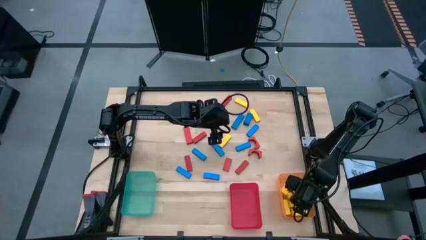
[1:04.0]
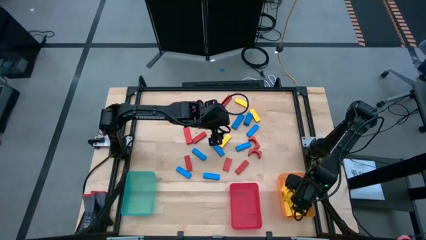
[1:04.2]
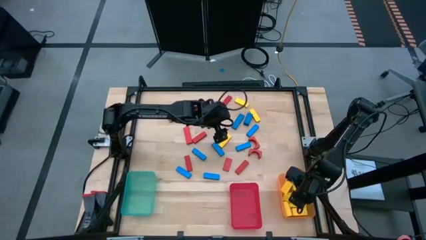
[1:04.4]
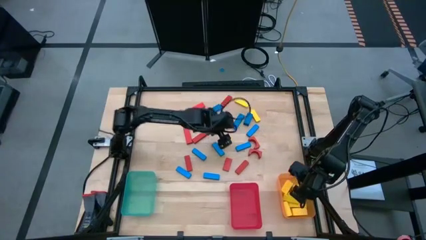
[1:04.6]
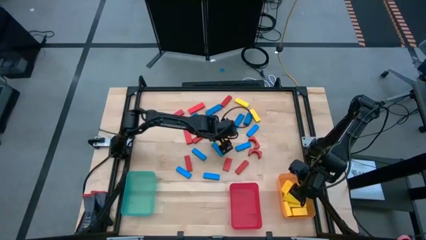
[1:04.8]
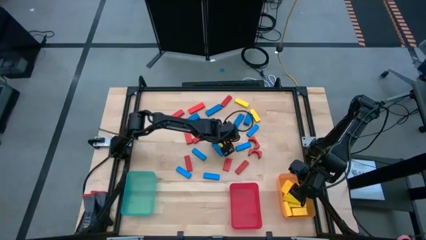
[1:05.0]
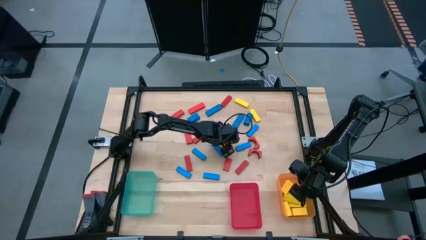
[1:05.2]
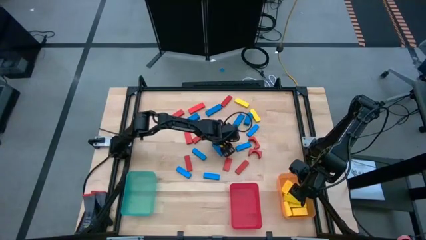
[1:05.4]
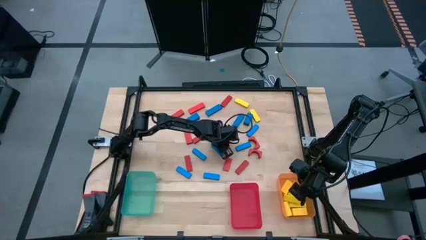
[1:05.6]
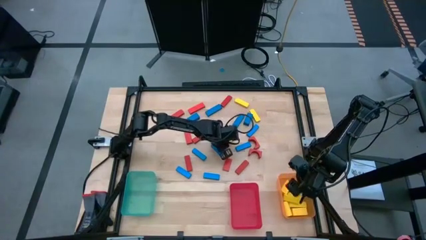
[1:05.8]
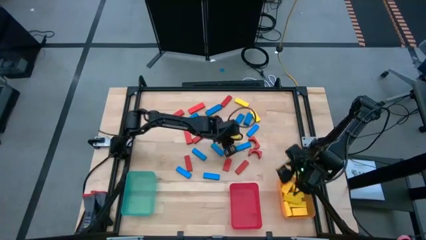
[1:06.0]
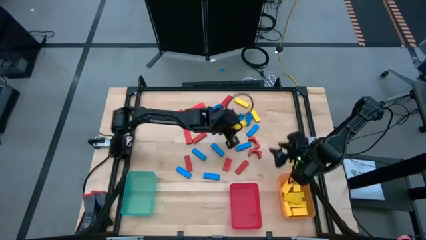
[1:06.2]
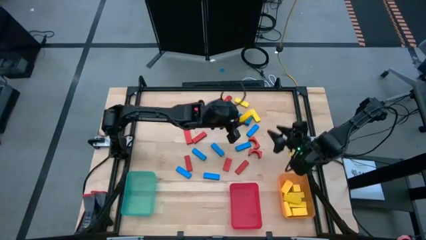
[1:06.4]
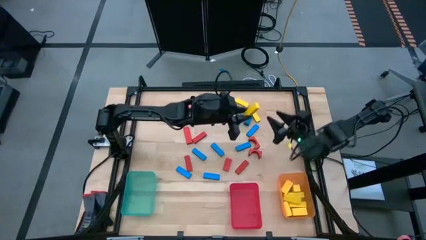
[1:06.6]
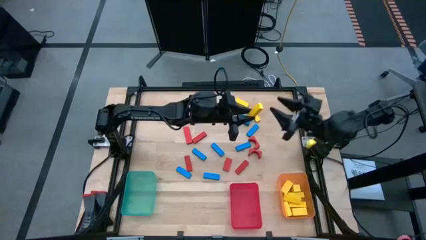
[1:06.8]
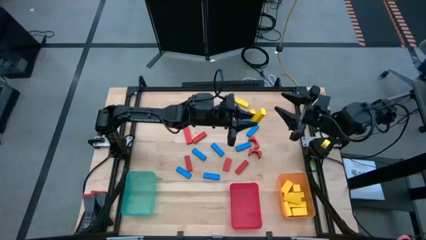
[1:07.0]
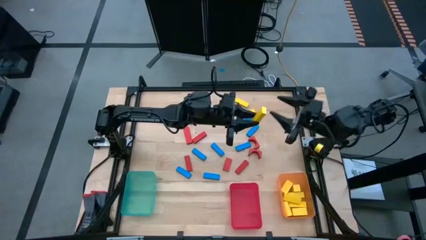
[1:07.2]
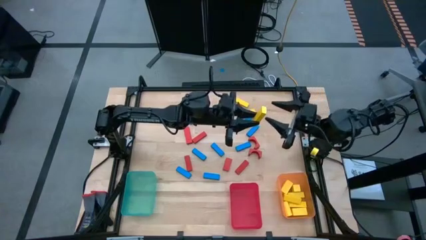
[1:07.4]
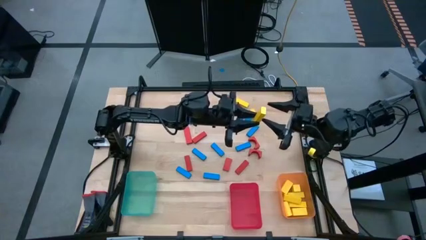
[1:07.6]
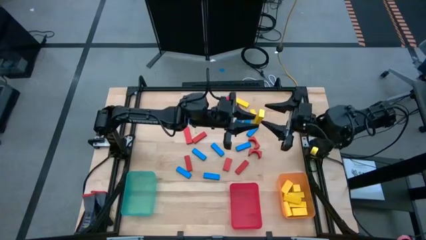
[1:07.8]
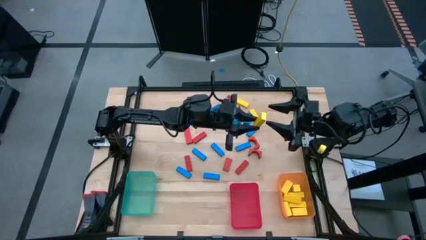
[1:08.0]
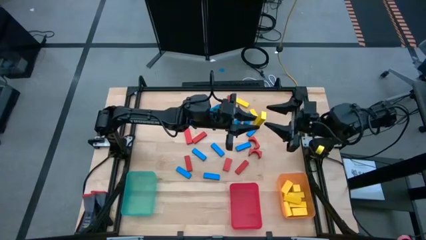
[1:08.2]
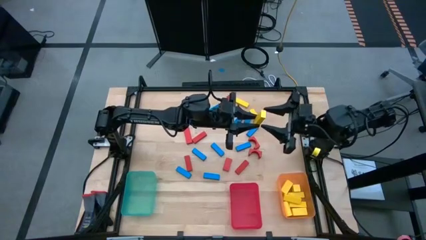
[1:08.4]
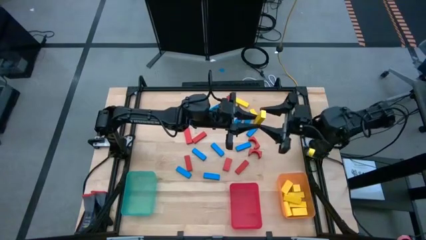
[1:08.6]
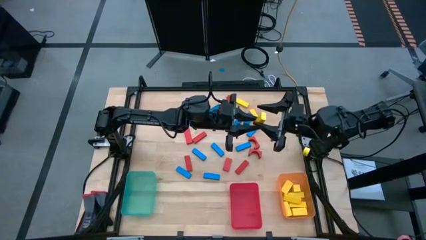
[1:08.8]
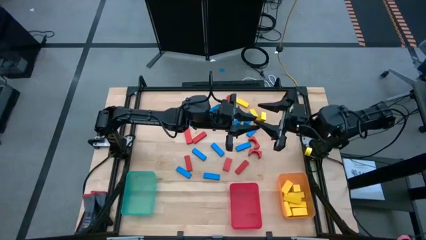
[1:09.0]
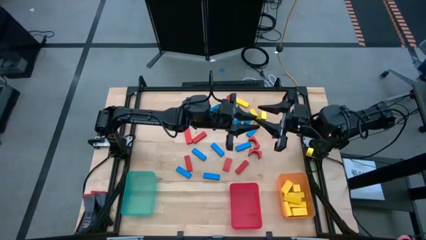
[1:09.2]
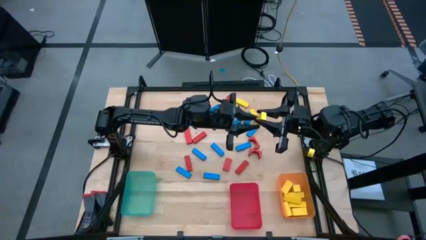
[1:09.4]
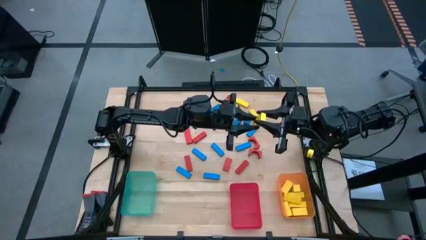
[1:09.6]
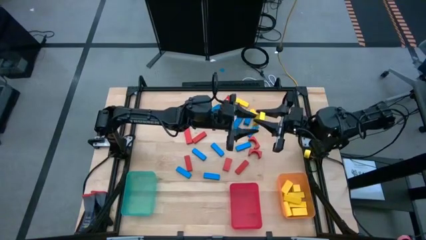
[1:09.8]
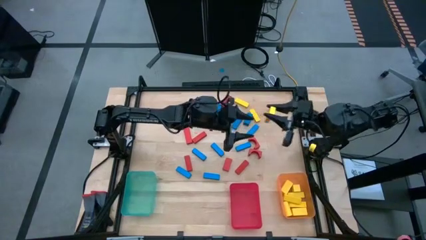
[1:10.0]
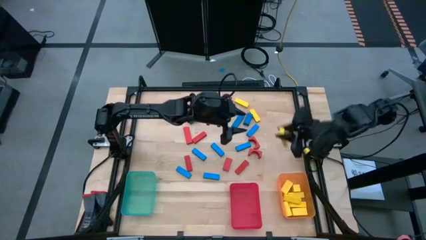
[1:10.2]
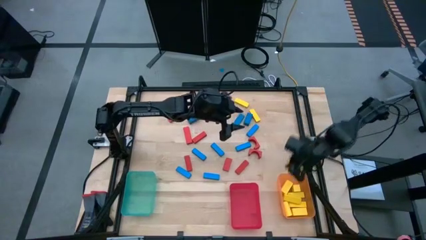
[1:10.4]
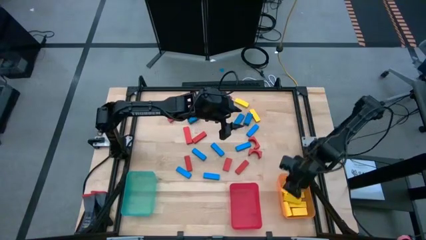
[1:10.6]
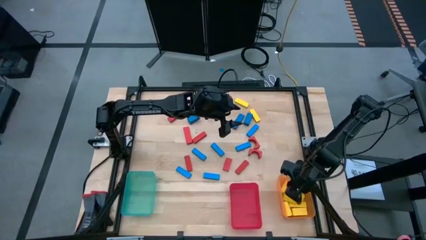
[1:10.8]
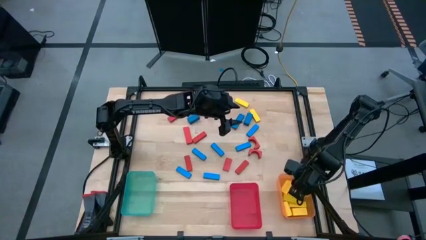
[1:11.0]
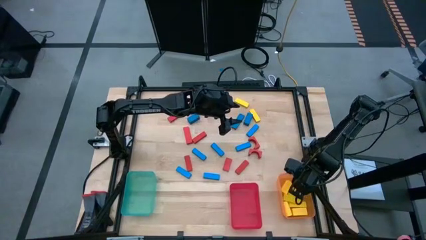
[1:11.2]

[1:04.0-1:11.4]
Task: Sort blocks
Put the yellow block into the orange bin

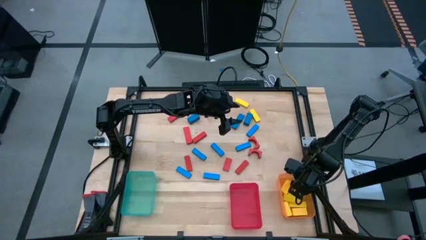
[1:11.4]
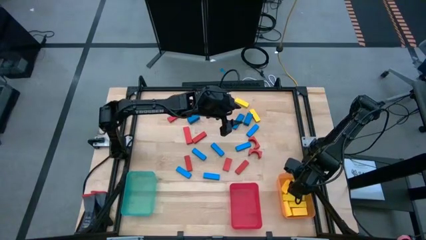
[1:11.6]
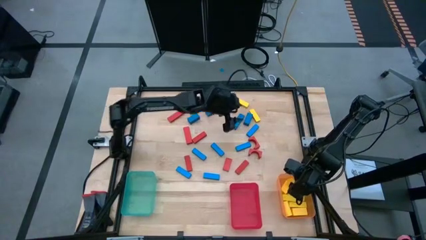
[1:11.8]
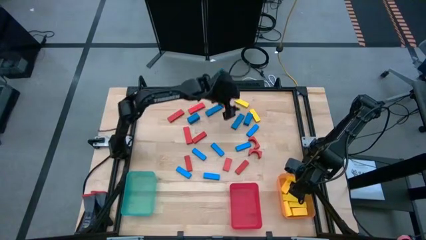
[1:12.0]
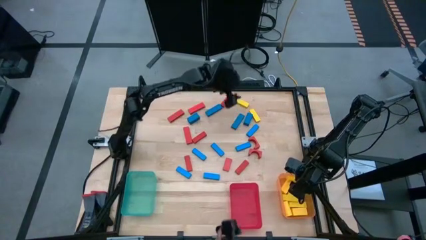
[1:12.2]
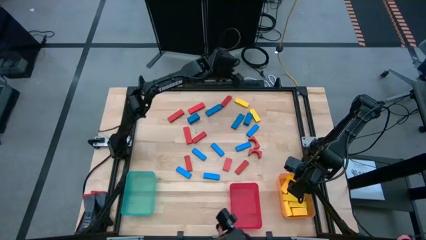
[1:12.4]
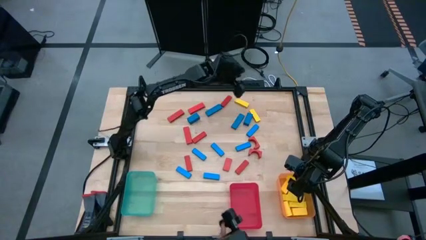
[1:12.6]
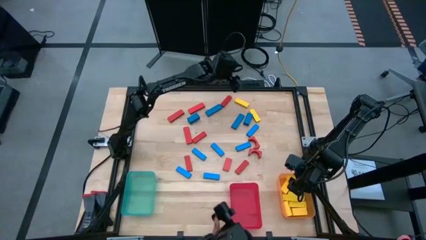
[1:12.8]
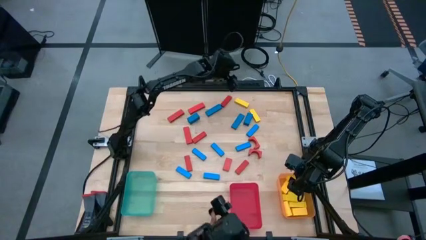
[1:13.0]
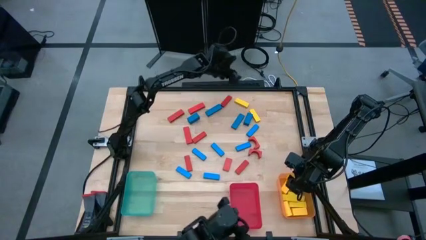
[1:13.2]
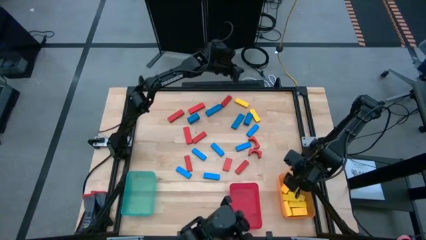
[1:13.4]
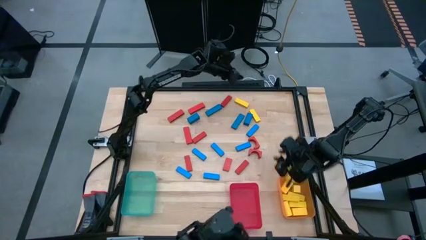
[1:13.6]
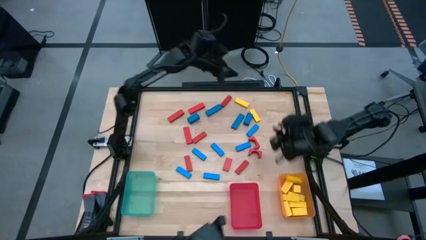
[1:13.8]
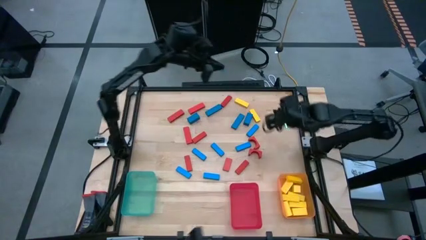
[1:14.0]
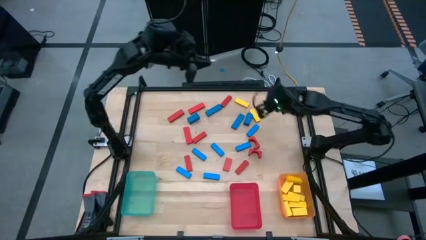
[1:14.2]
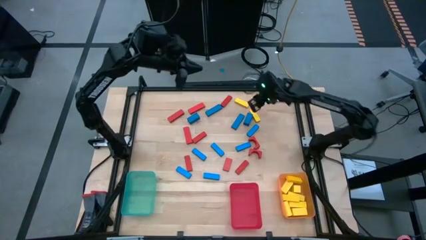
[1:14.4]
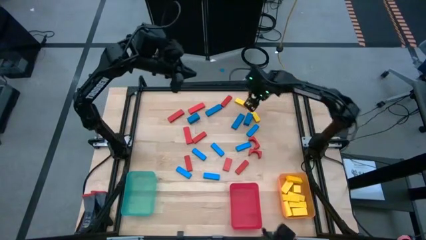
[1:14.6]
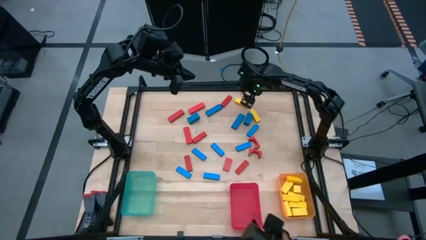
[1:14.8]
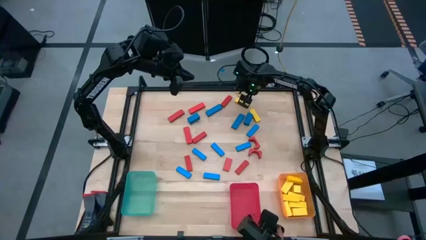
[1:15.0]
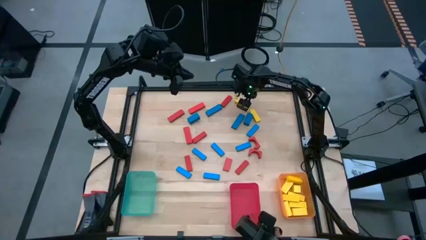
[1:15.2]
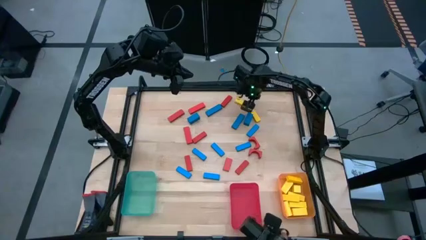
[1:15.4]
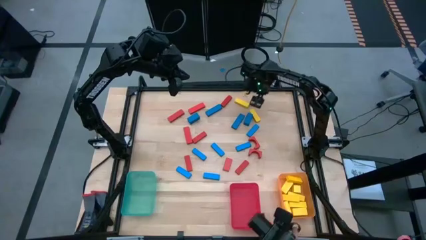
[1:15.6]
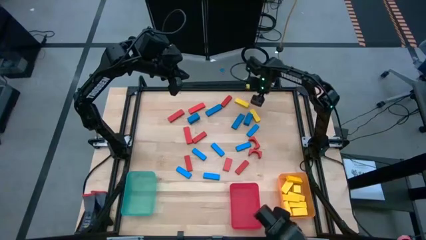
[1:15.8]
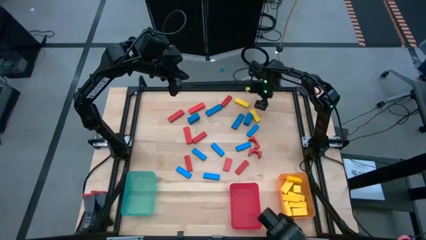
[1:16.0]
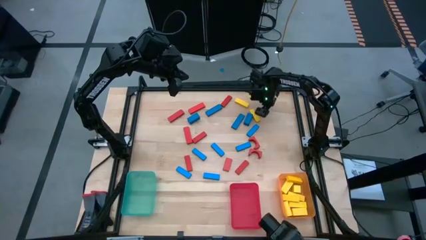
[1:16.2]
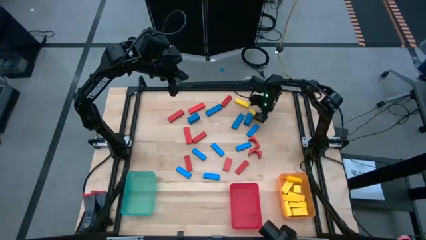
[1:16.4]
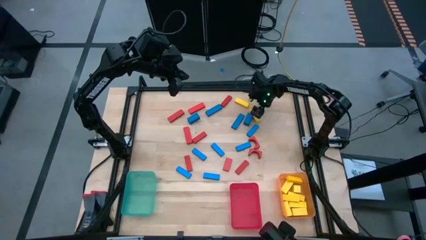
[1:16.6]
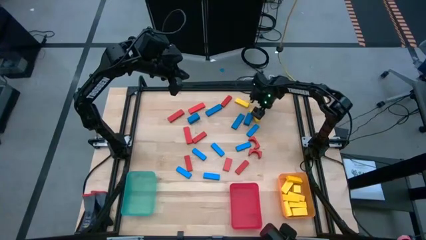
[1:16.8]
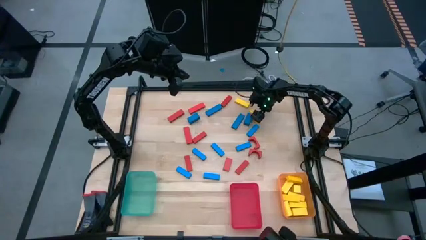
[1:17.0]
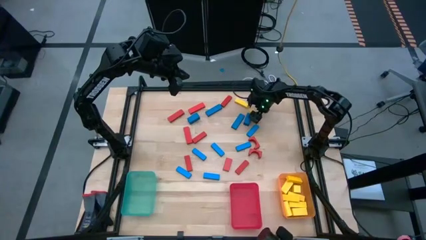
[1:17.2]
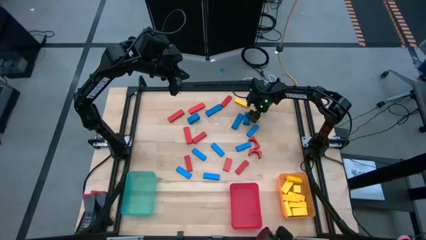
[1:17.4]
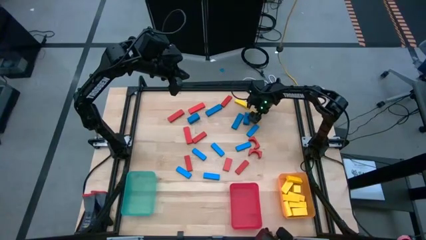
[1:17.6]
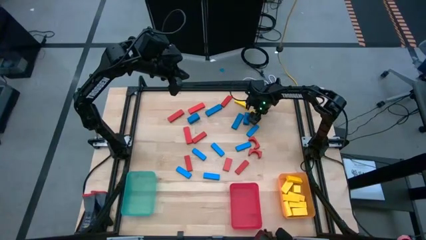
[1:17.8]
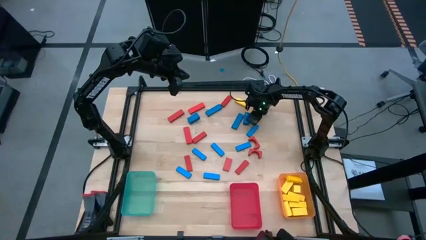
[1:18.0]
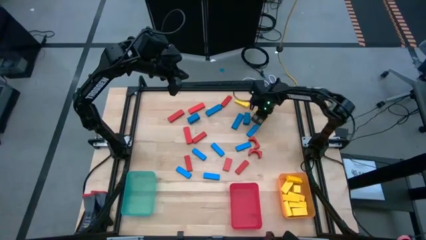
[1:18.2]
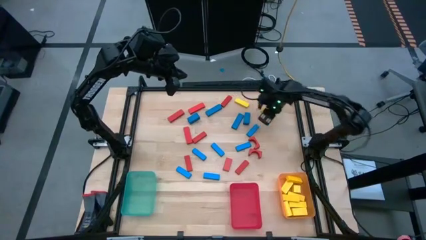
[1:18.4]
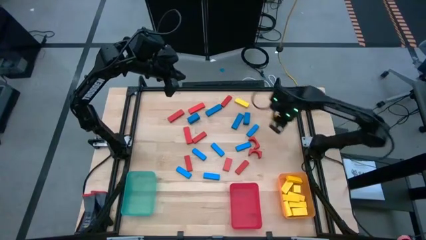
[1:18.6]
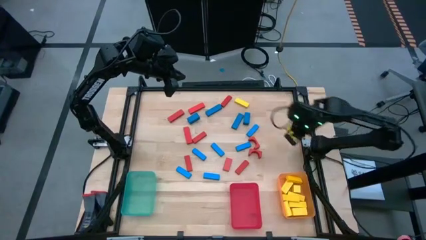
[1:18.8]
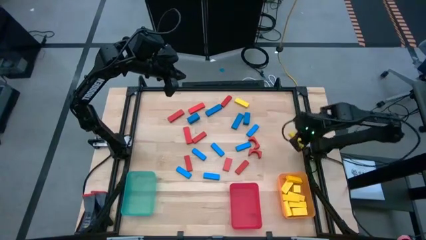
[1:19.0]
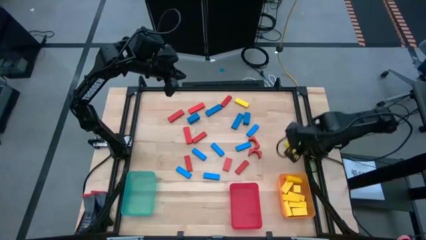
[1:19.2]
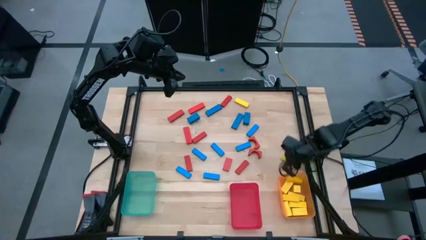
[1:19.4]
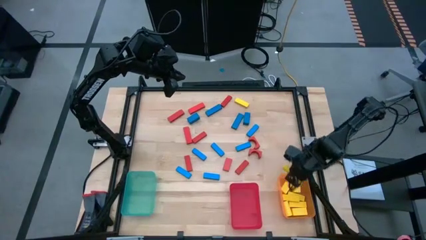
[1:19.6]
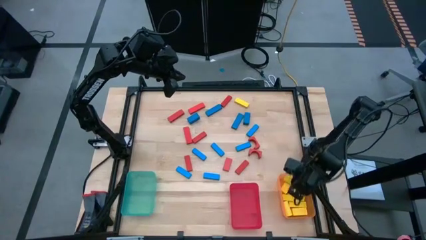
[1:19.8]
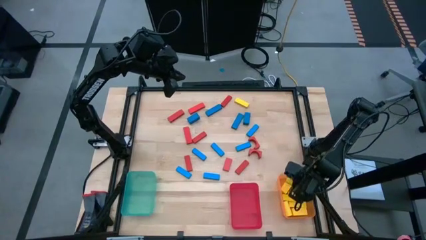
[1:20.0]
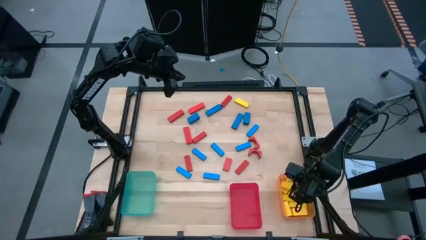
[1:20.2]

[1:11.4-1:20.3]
Put the yellow block into the orange bin
